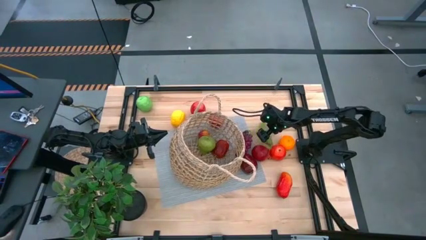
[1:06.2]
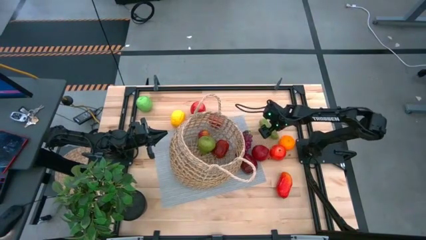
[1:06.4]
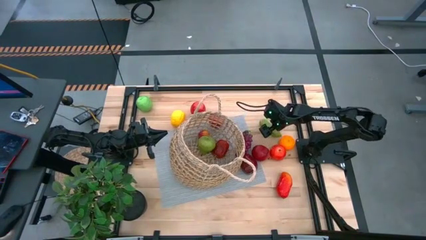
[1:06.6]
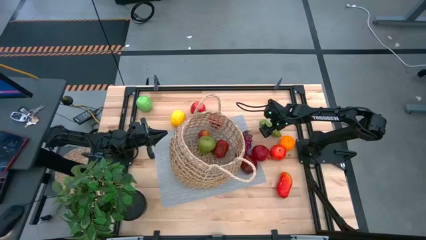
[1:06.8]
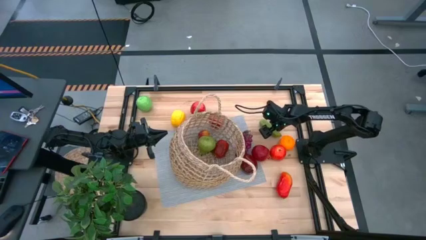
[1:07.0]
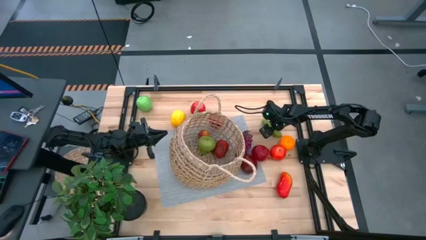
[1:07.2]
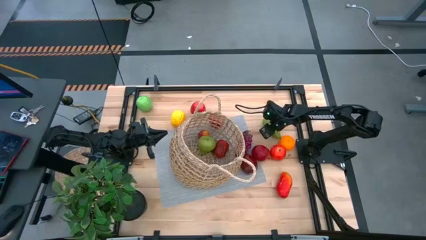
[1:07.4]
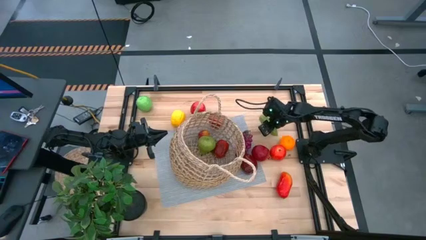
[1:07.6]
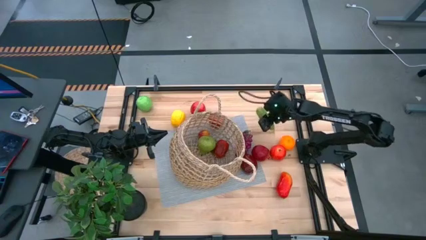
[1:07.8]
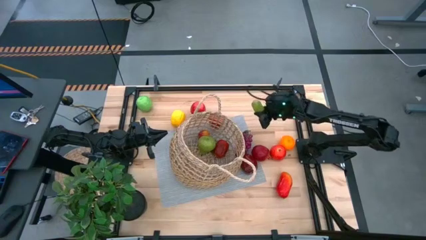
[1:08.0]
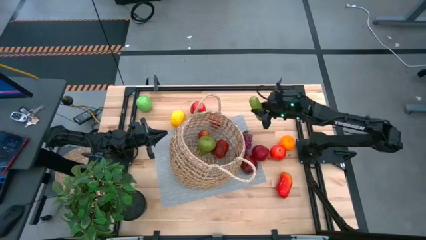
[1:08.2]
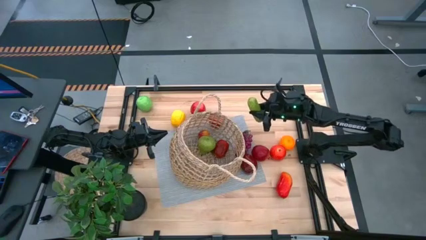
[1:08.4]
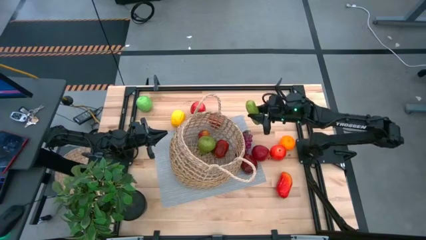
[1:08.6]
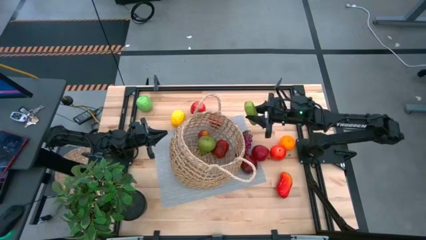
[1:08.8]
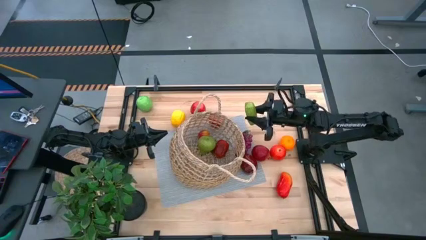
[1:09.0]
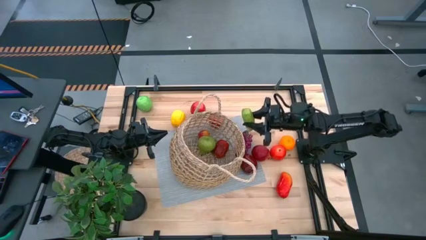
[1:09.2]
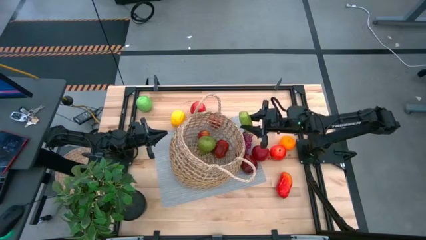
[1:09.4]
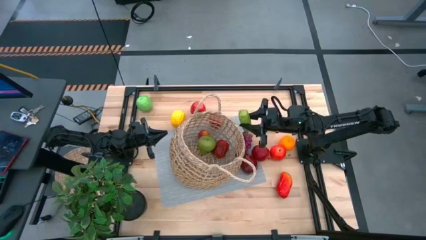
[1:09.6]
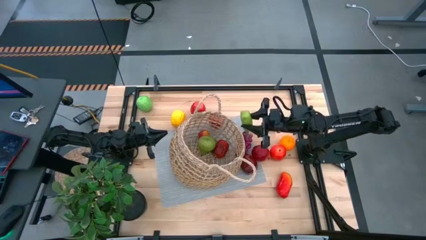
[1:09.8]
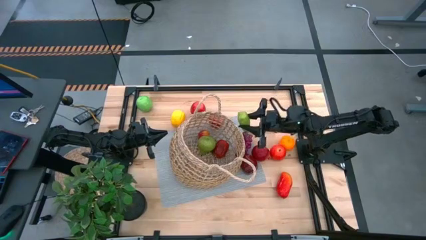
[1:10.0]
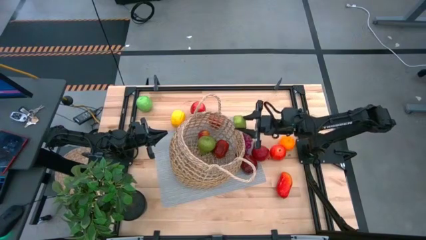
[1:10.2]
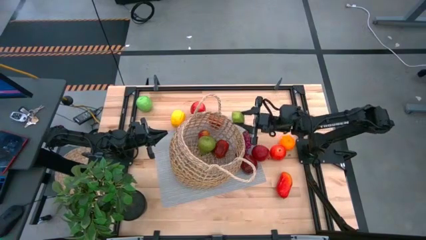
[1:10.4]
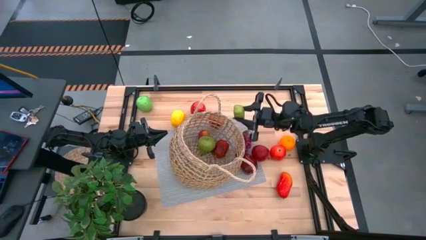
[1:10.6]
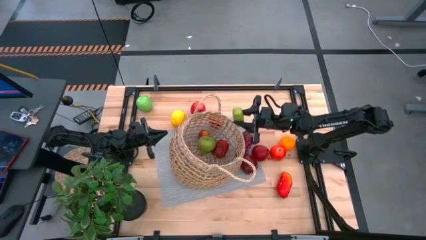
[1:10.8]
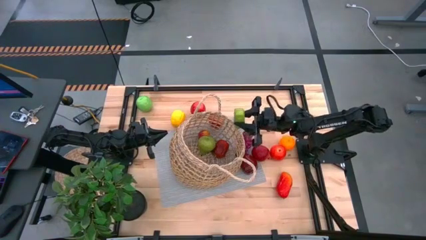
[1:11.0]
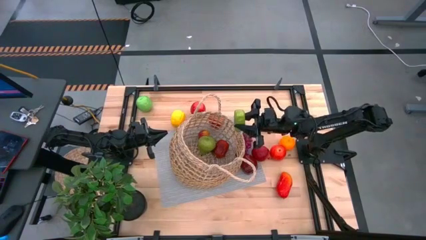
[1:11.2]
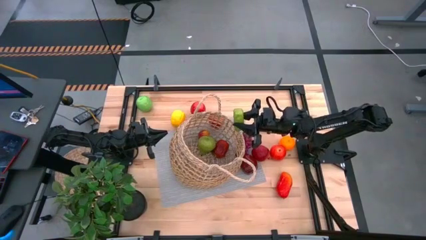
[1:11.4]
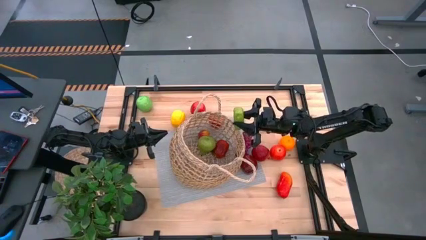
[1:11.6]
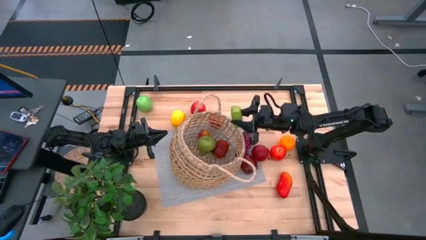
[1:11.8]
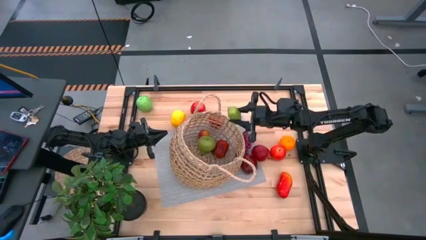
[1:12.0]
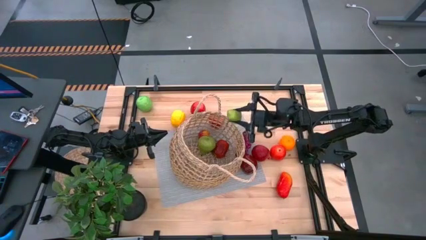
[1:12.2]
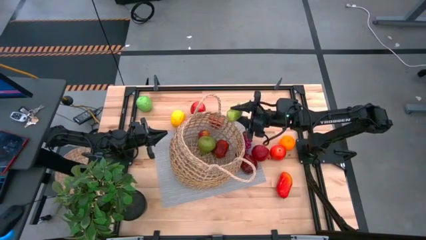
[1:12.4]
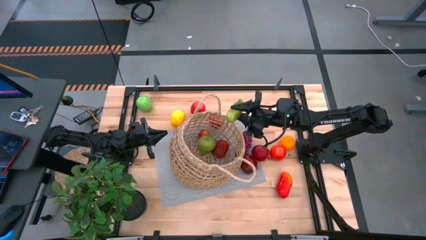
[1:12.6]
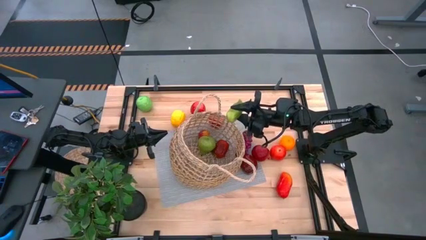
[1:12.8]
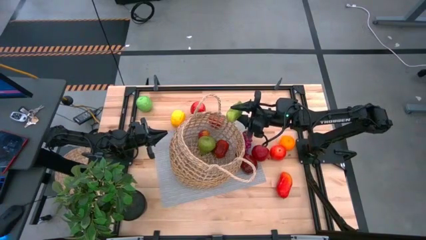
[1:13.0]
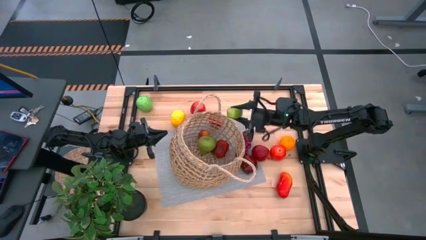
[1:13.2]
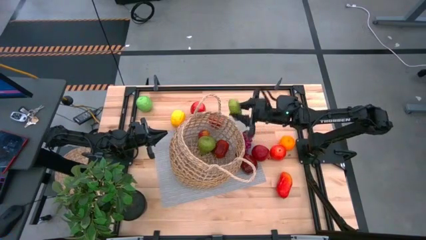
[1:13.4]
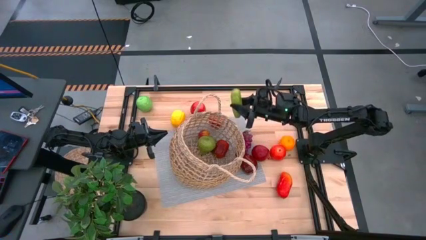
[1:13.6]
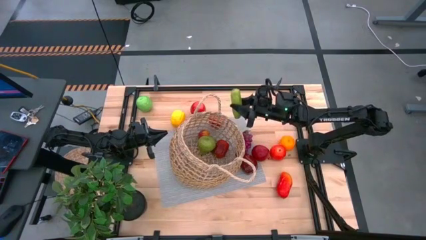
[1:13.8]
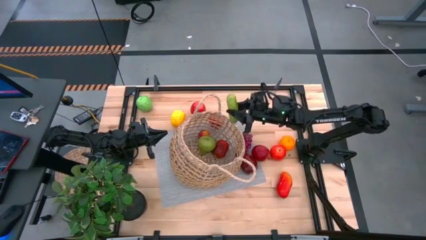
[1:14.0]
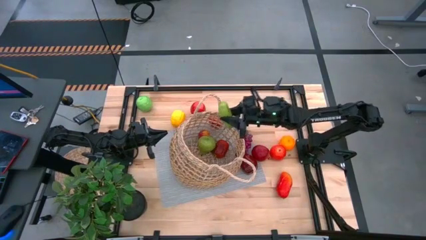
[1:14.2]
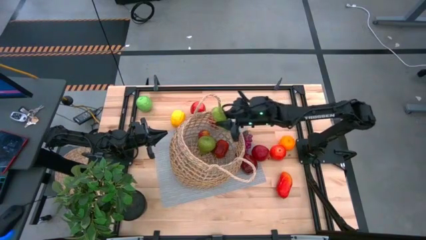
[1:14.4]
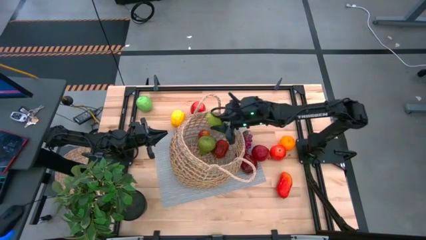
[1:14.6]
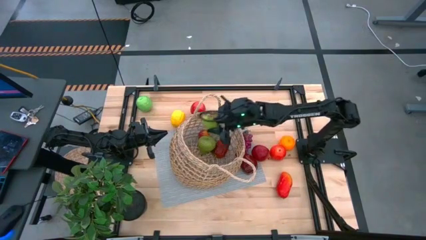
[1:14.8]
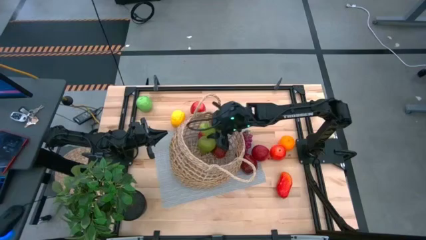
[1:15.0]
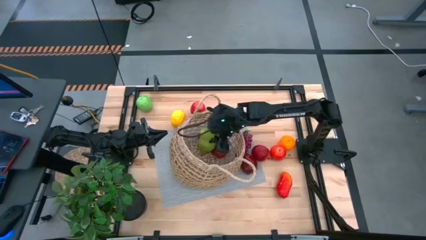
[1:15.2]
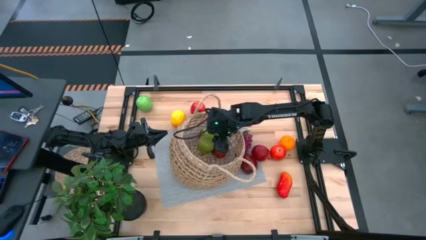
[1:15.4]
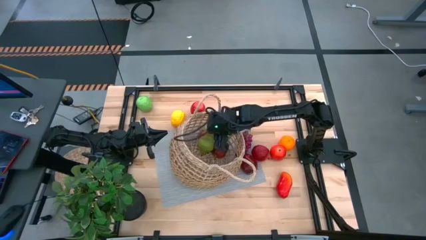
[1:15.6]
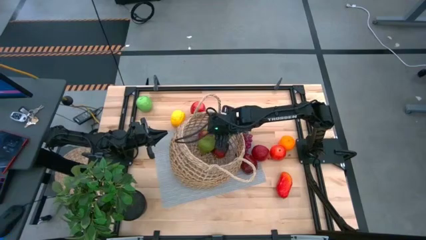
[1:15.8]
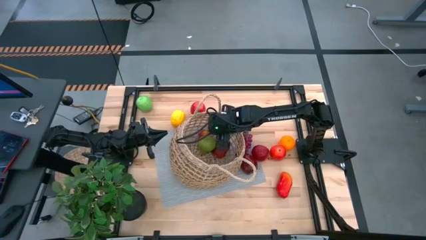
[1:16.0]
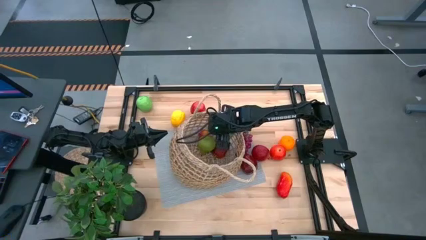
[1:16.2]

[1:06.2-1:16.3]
Task: Build produce basket
Put the cucumber into the basket

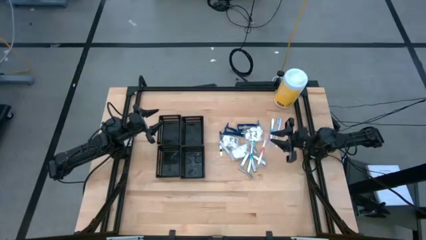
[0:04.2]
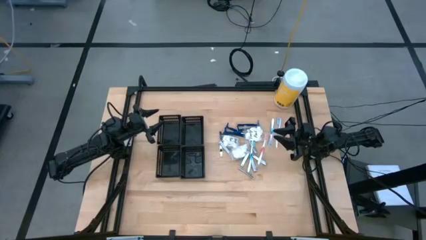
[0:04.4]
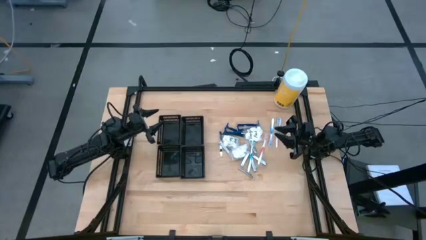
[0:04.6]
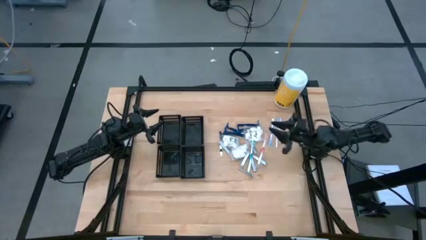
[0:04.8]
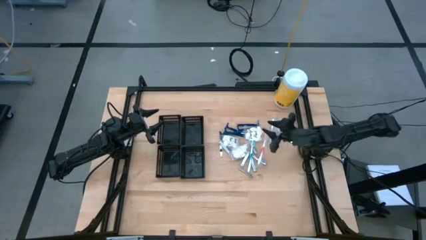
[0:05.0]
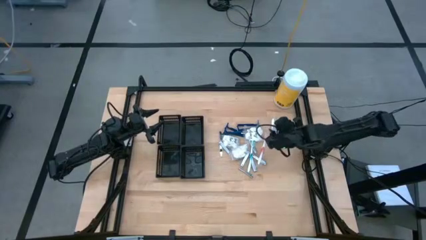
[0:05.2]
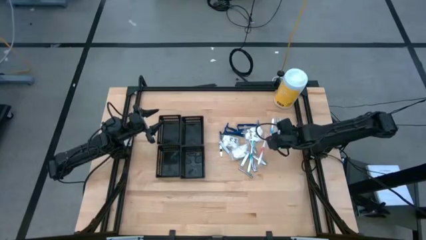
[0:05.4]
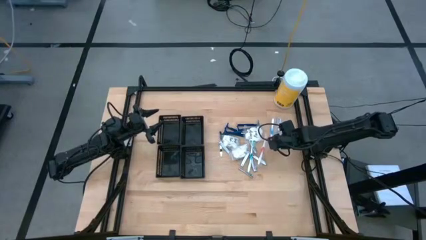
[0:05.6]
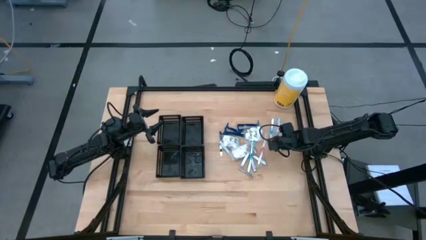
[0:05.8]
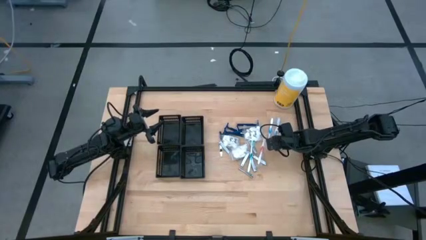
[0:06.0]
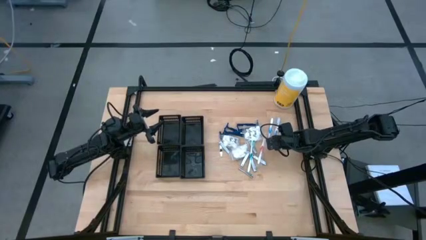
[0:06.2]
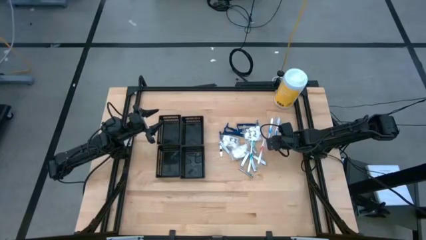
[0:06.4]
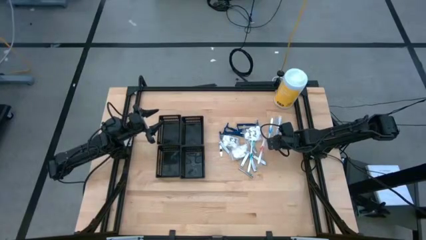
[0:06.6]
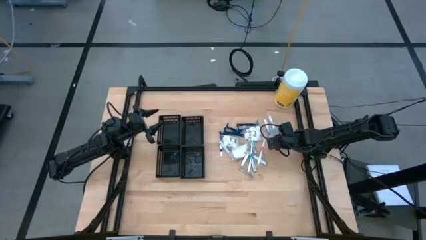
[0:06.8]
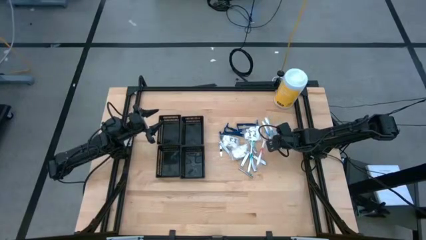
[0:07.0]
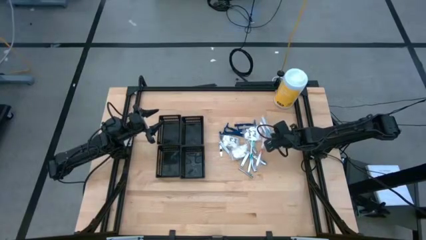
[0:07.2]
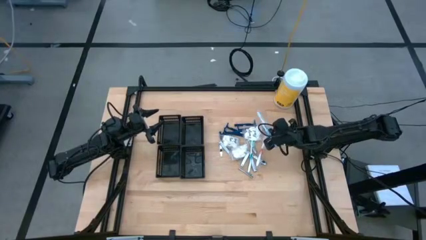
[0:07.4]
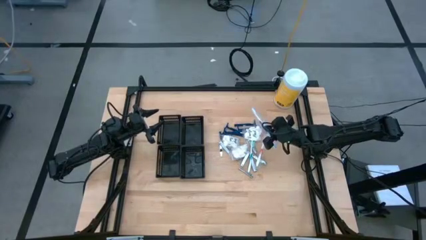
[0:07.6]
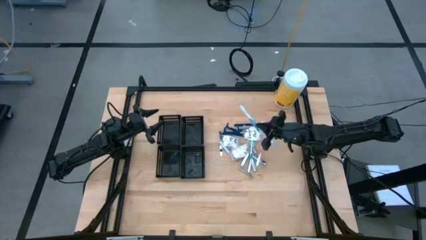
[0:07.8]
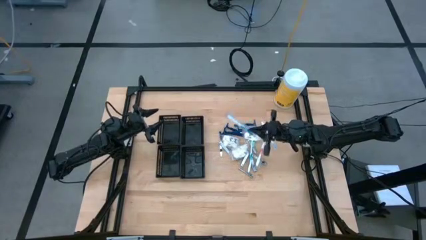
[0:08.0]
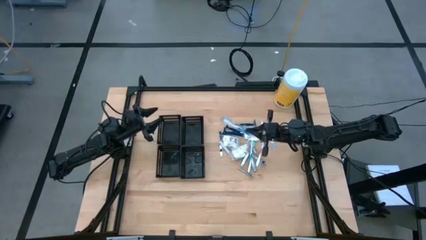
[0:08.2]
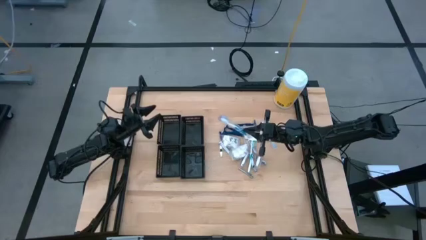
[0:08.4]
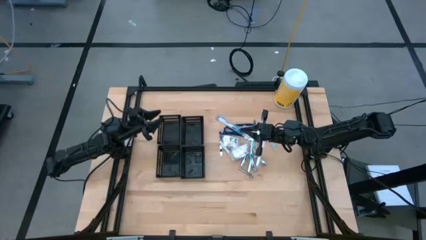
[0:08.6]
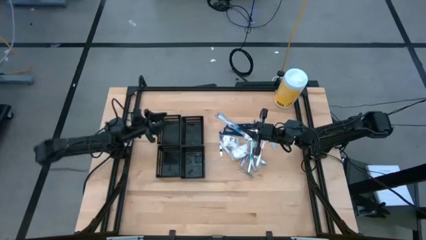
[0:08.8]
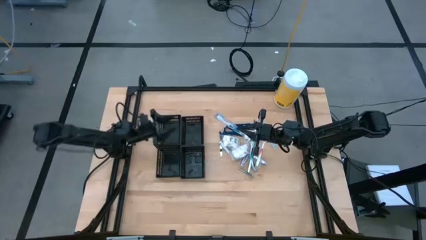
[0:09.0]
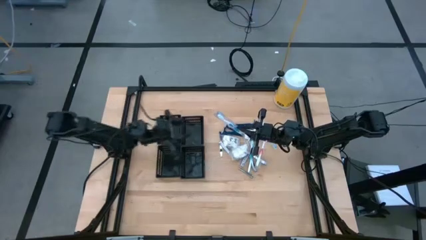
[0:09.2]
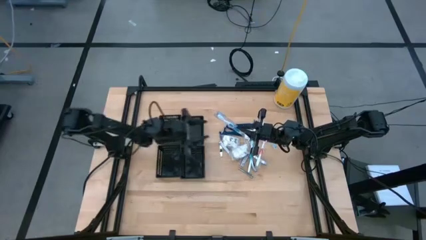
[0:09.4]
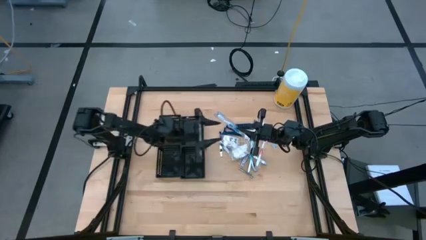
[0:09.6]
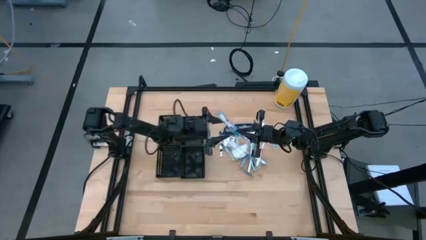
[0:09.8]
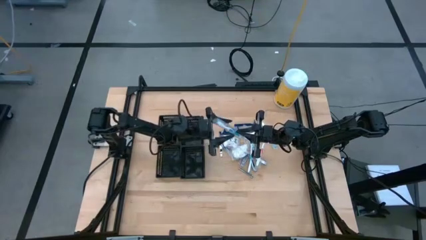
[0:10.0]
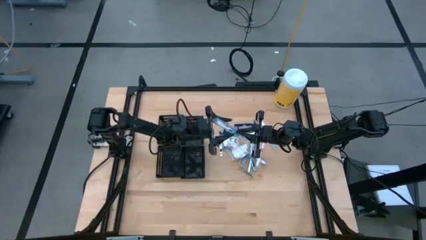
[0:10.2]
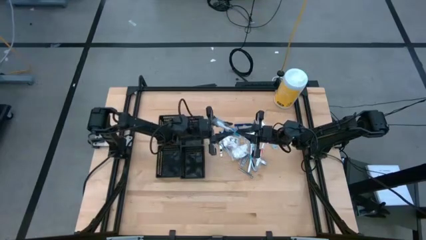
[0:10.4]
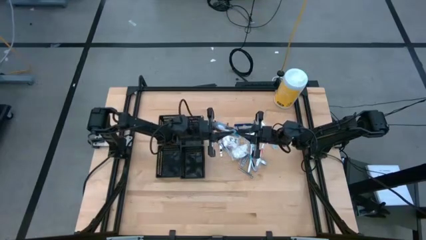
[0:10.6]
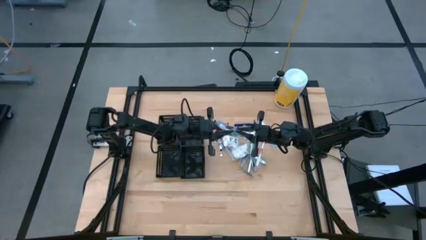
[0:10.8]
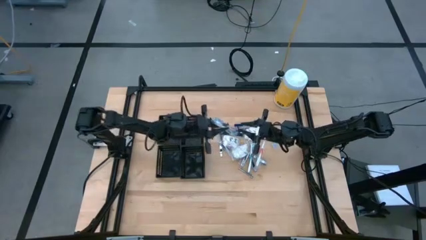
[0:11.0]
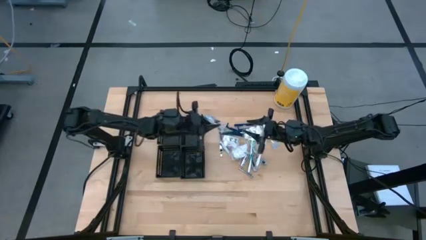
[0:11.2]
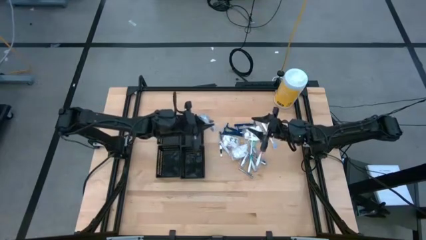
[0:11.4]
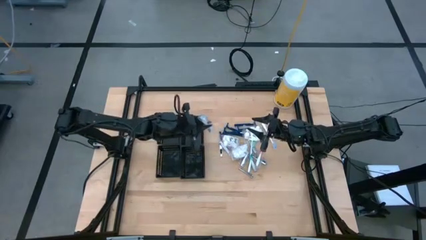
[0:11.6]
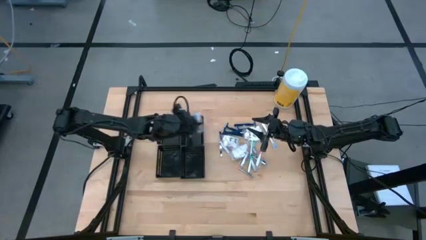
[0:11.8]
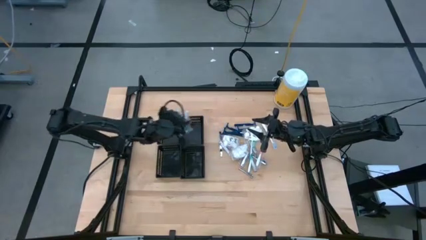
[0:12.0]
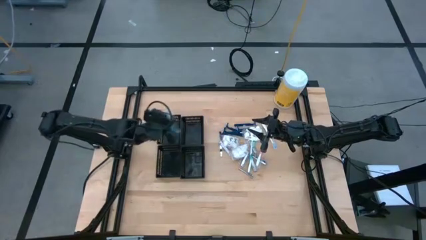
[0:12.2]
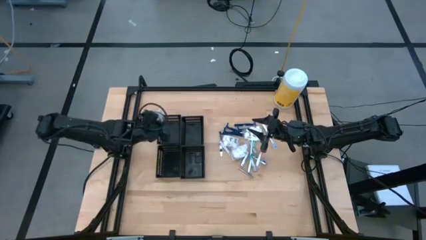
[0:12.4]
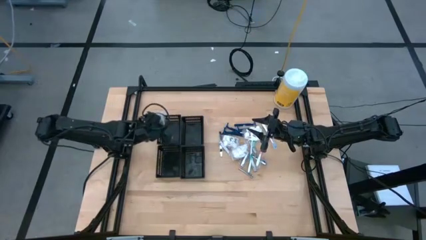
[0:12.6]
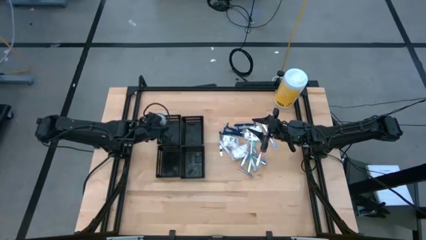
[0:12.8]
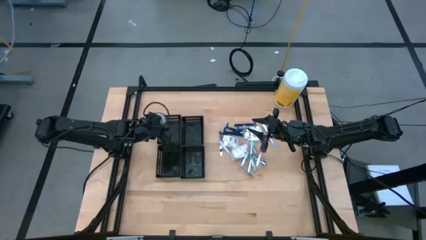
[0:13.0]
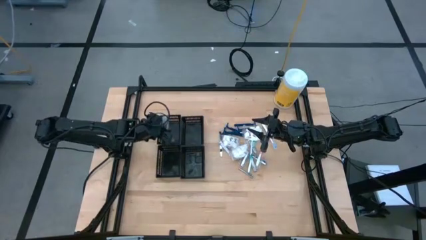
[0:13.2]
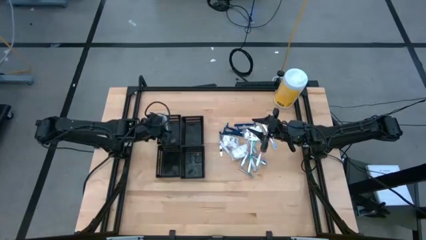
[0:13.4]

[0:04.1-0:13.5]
Task: Pick & Place Travel size toiletries
Put the blue toothbrush into the top left black bin
